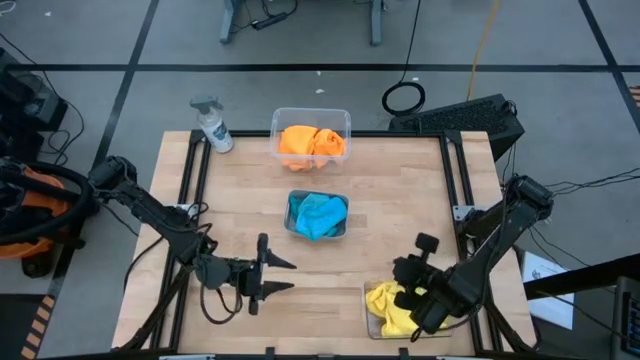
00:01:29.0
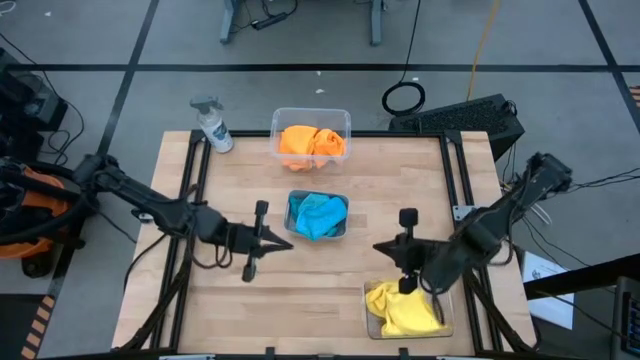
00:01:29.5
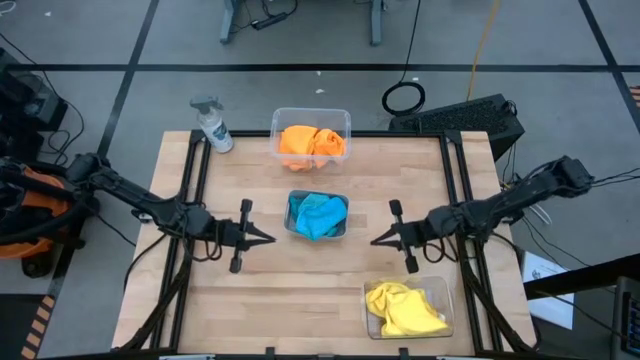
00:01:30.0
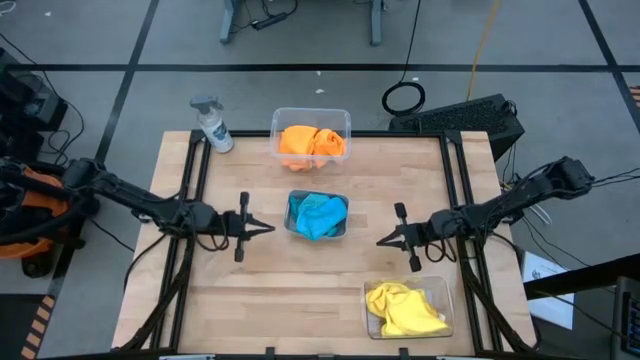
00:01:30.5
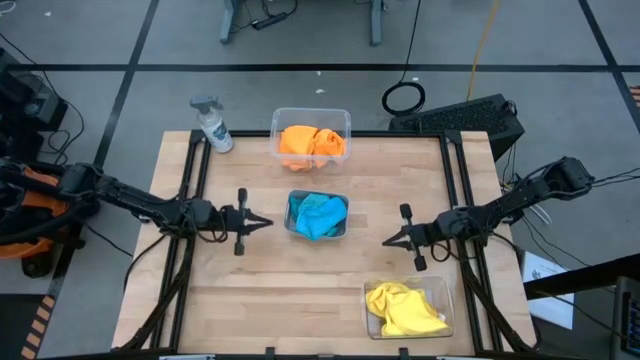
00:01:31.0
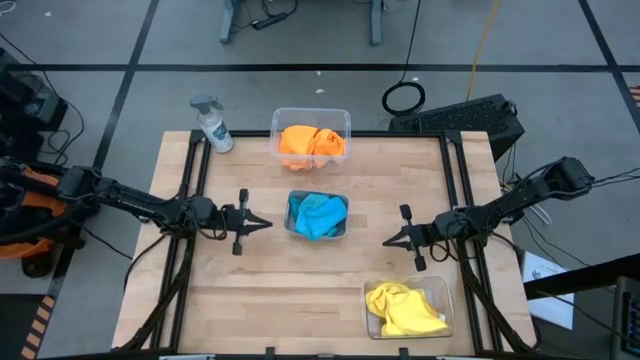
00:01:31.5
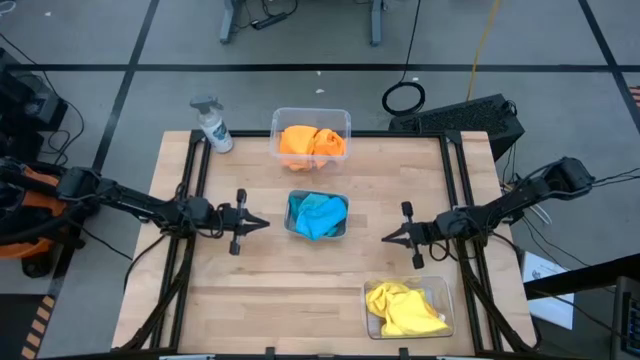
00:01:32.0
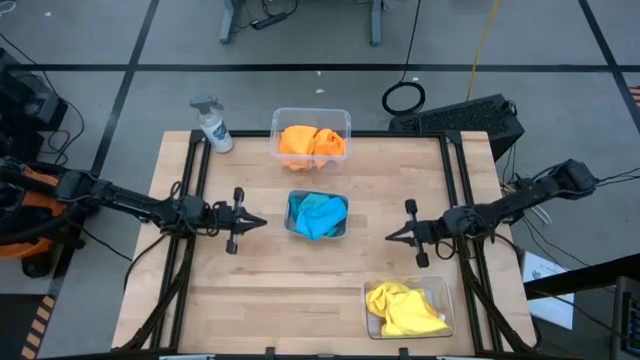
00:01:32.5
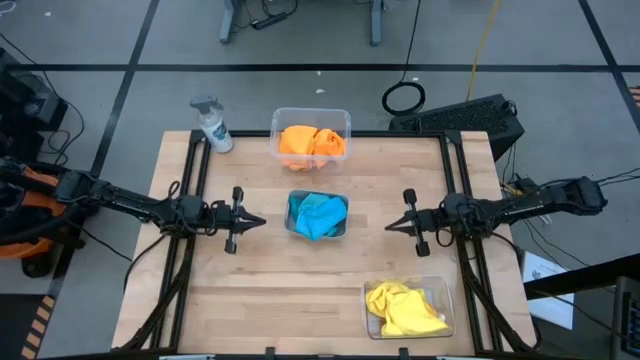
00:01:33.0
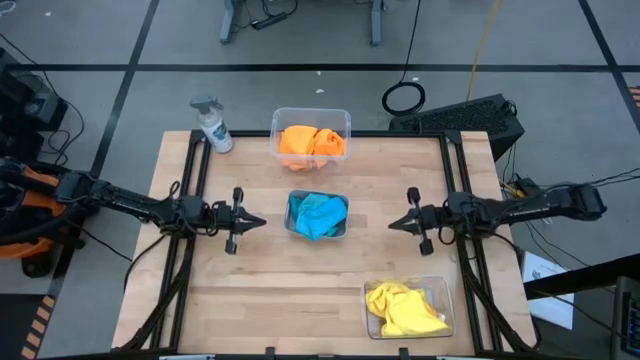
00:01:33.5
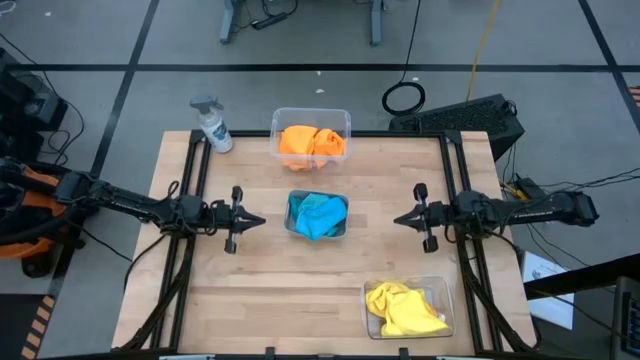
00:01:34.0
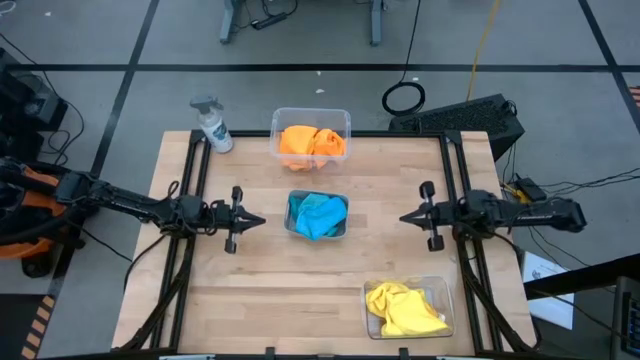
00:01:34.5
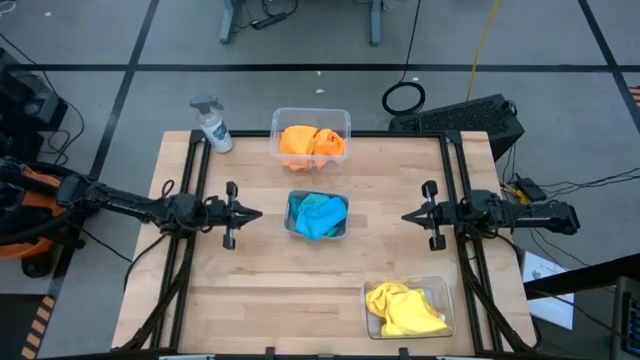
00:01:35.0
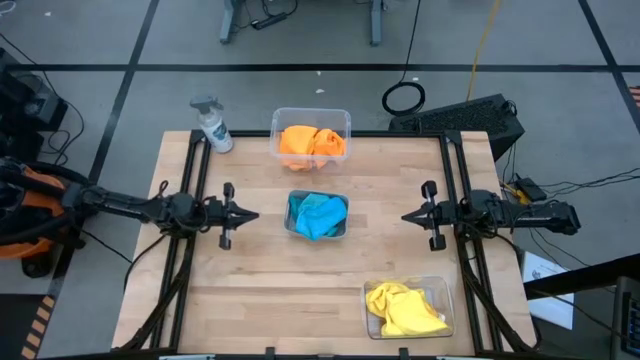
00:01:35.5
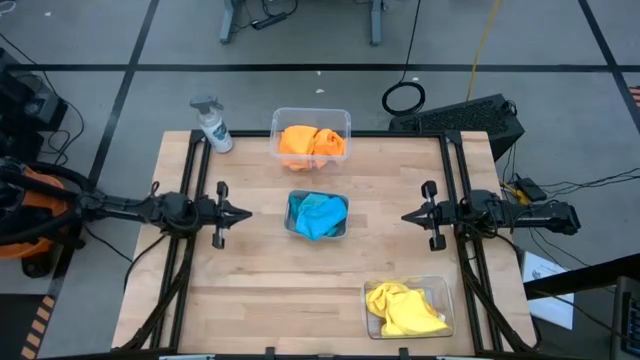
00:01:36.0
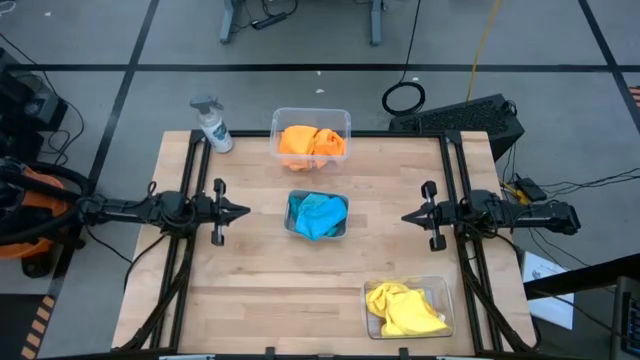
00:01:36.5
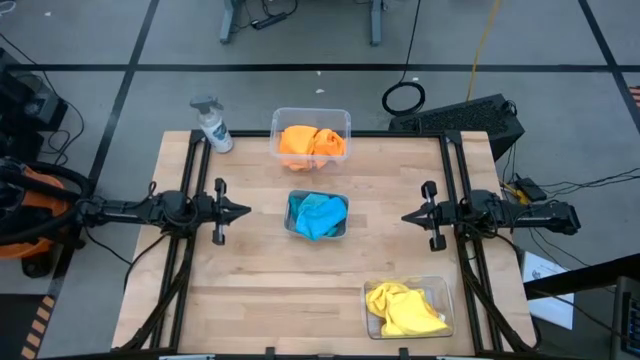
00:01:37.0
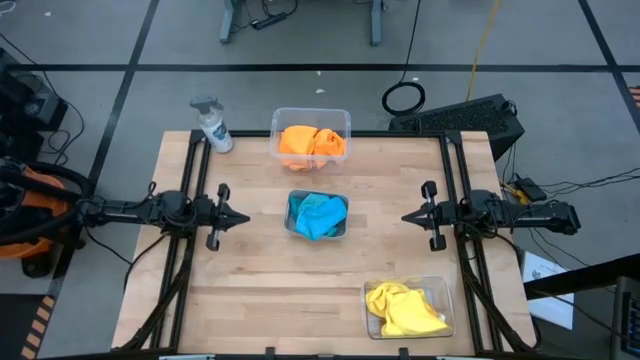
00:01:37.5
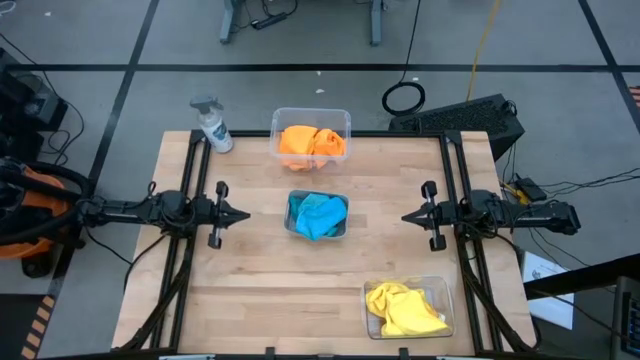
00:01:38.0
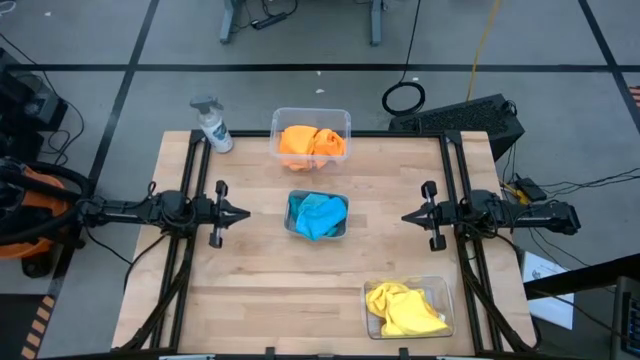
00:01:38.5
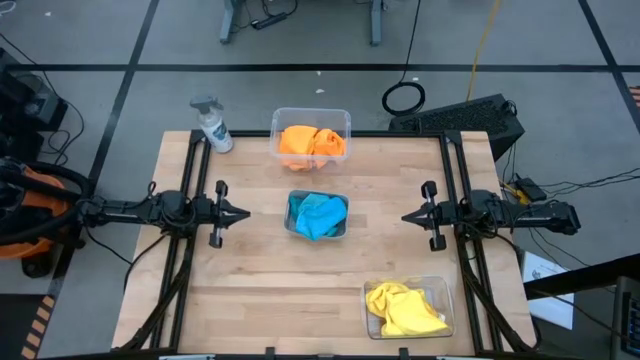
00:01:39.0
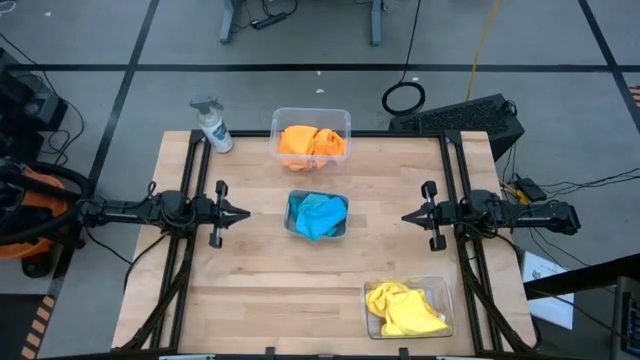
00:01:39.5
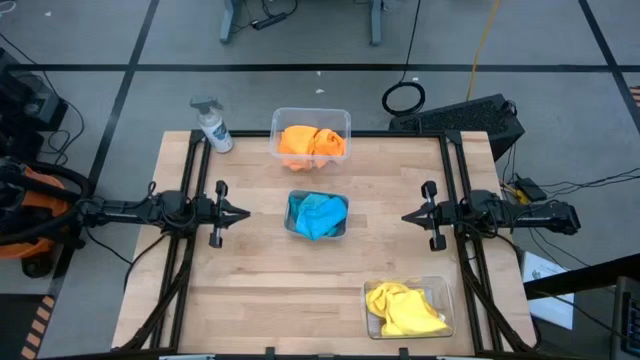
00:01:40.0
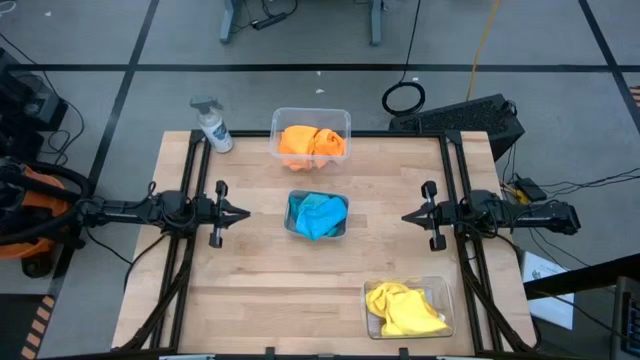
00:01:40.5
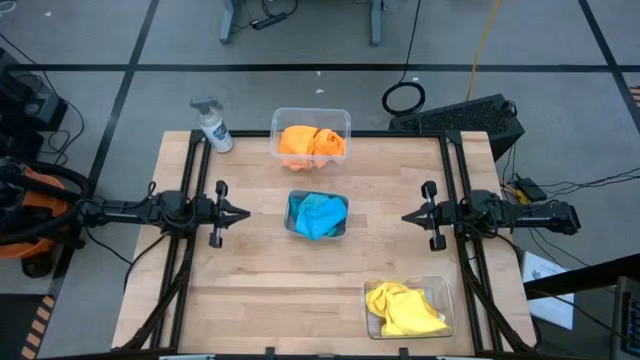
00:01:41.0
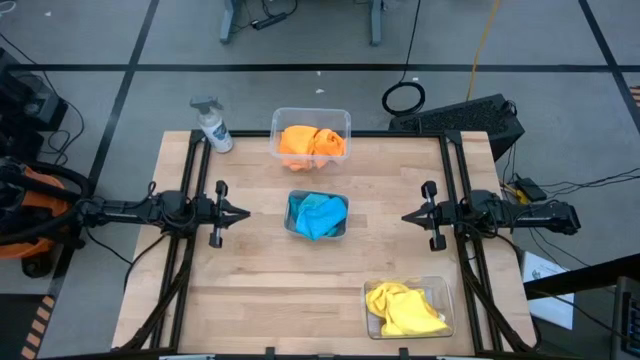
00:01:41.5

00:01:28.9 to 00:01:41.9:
Task: Sort microfiber towel by color & place in baskets
Return to Home Position

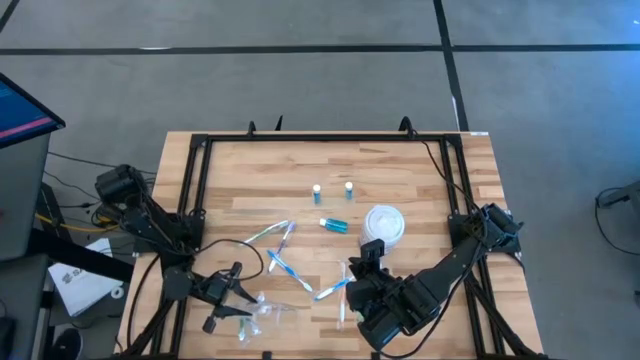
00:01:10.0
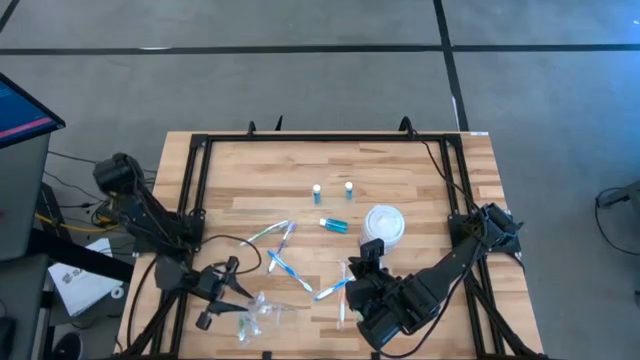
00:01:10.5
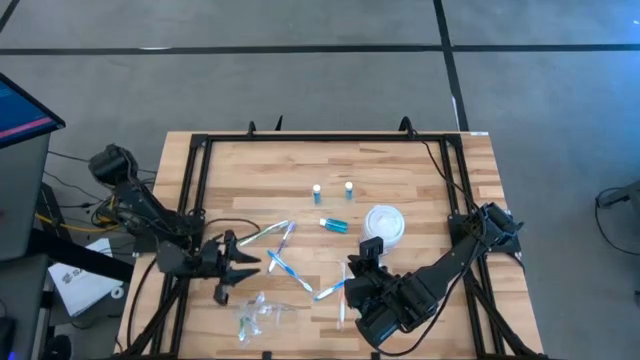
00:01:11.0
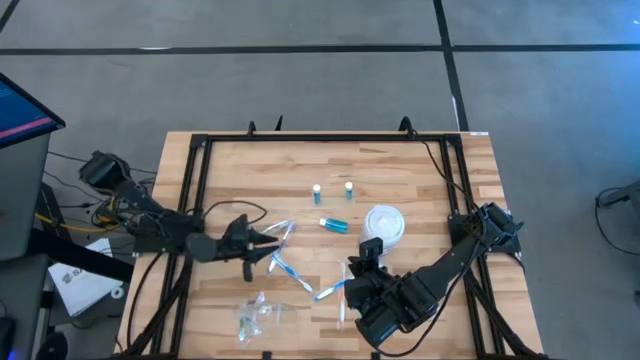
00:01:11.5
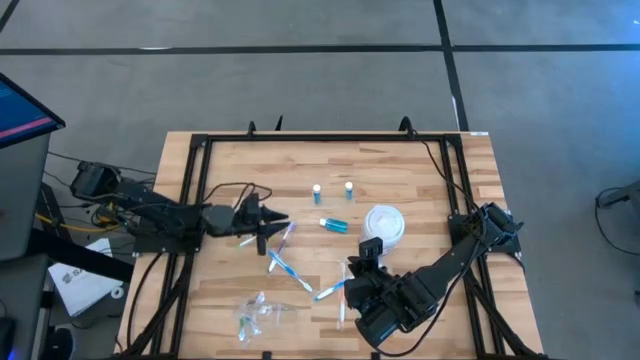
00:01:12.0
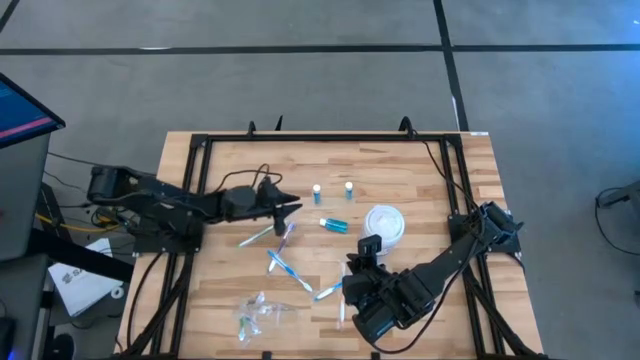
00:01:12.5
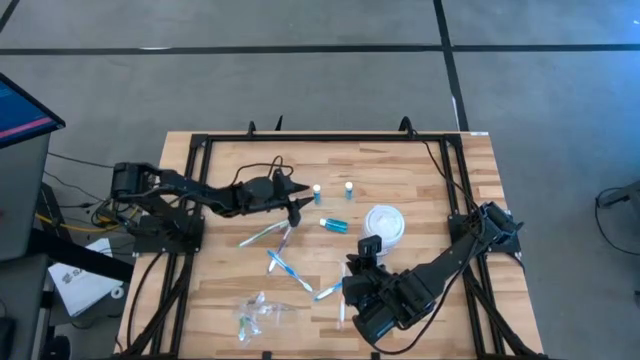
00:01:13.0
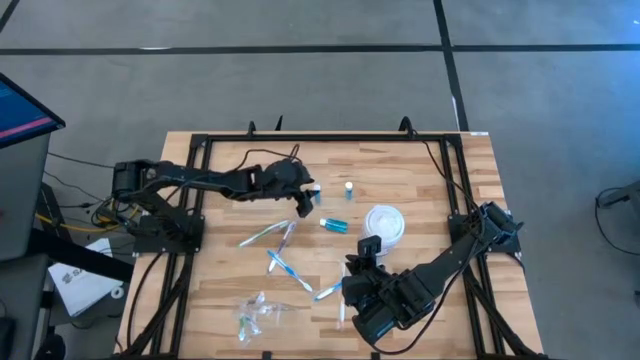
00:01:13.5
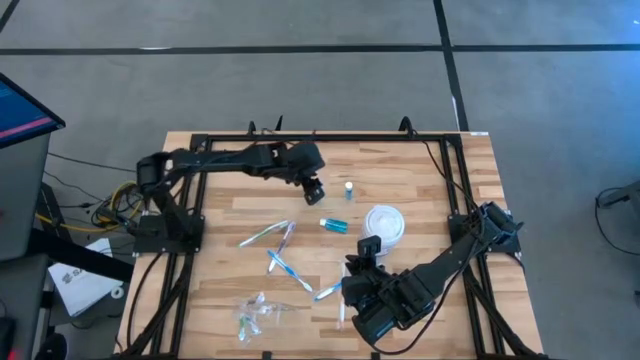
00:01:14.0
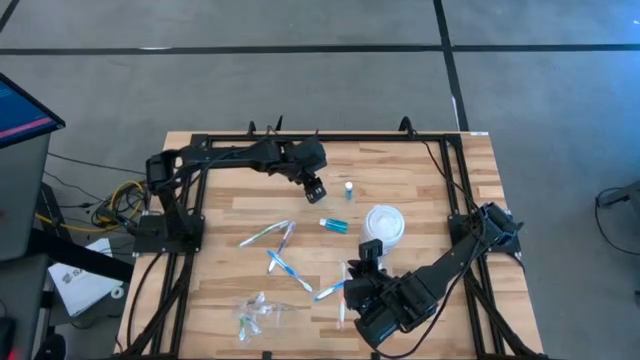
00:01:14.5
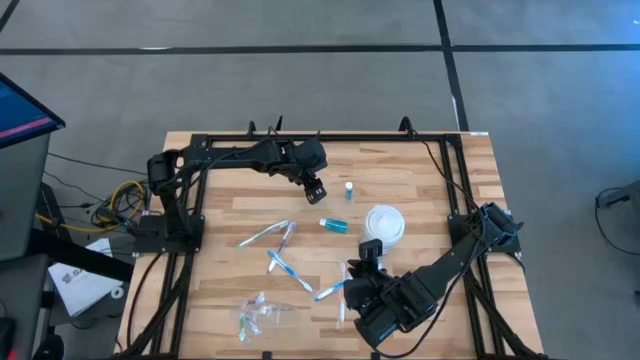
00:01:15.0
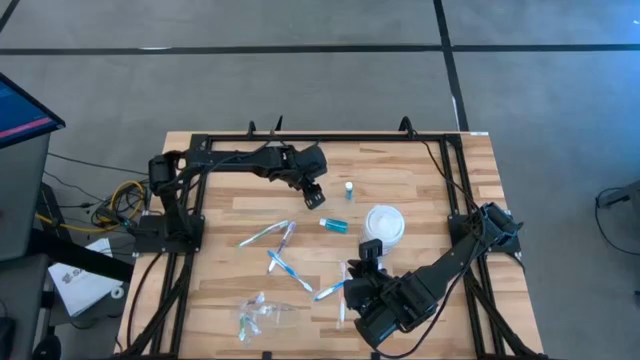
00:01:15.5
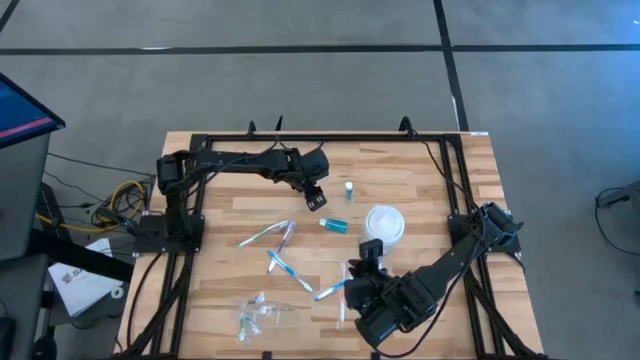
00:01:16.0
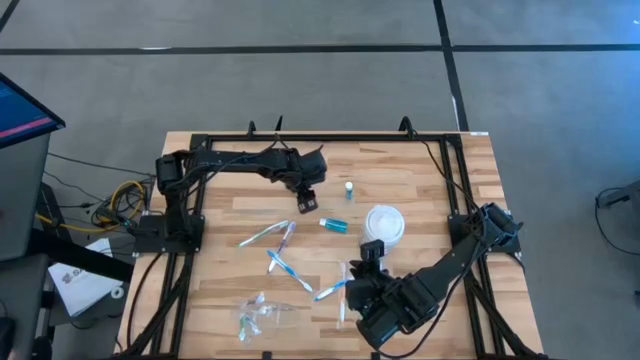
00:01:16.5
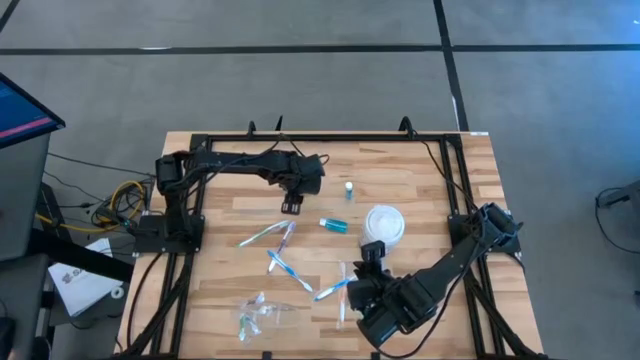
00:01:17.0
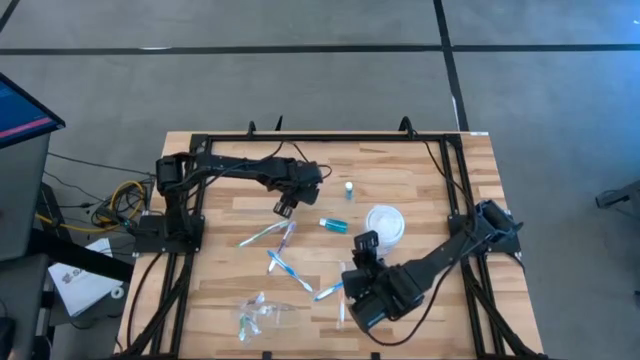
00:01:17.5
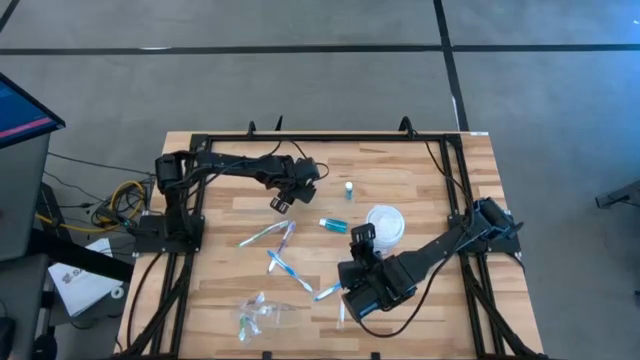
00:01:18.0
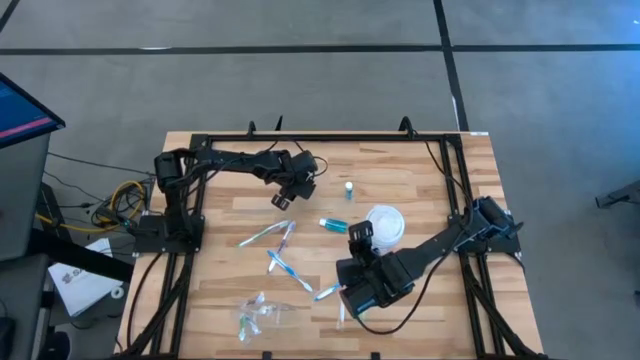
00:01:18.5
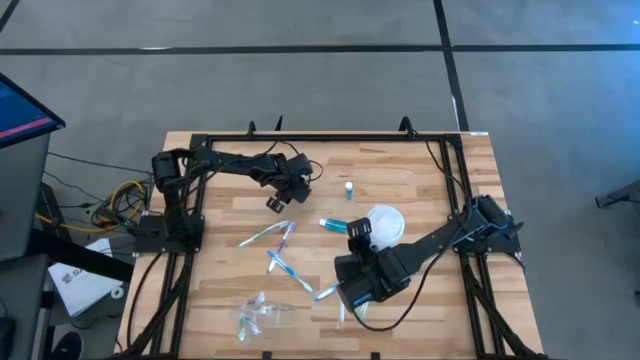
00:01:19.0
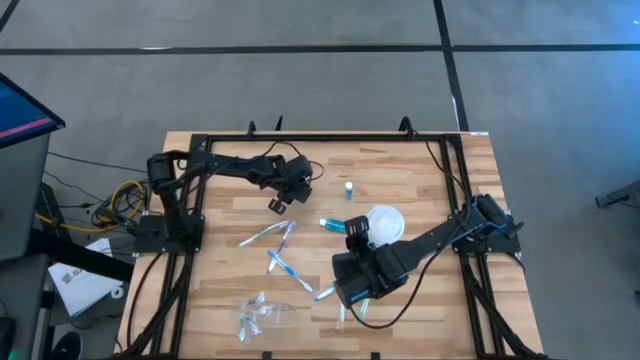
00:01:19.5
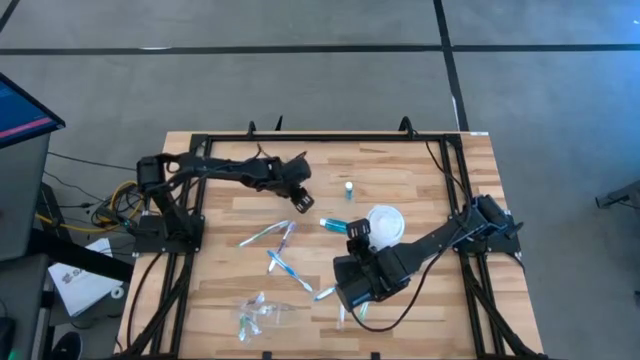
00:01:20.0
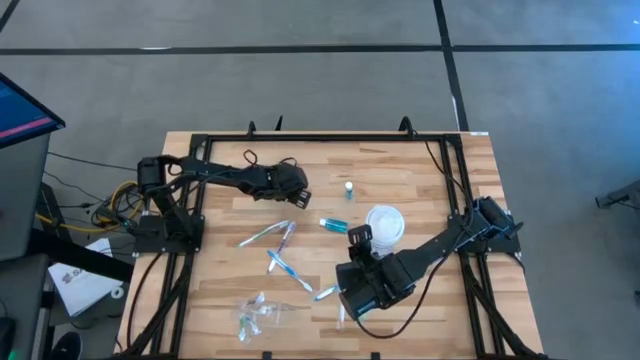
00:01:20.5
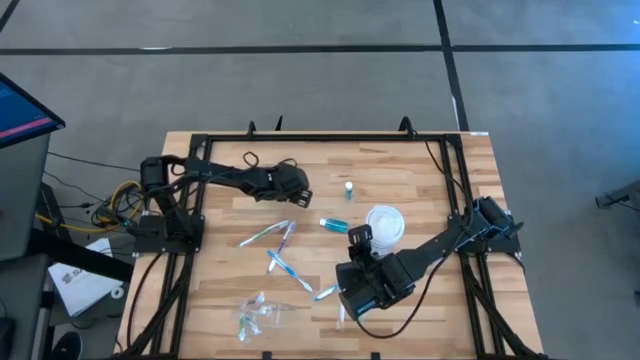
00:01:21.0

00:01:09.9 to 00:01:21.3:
Task: Pick & Place toothbrushing station
Put the top left blue mouthwash into the transparent organizer
